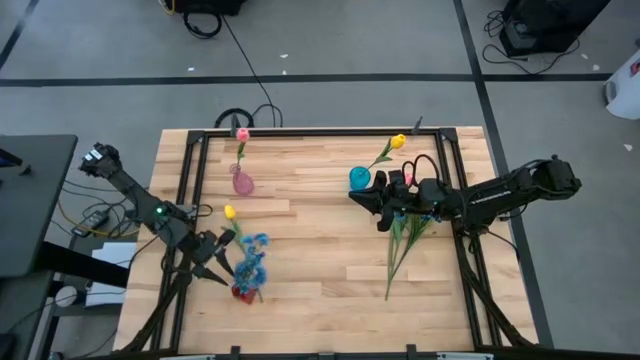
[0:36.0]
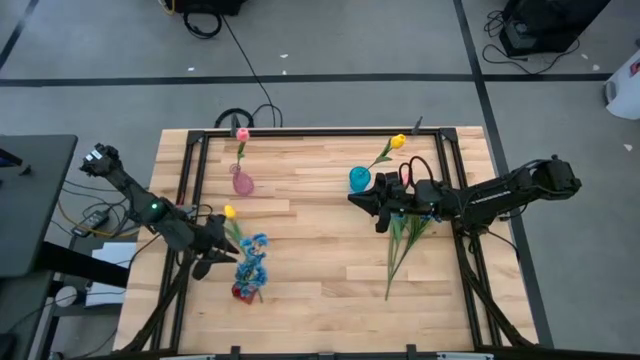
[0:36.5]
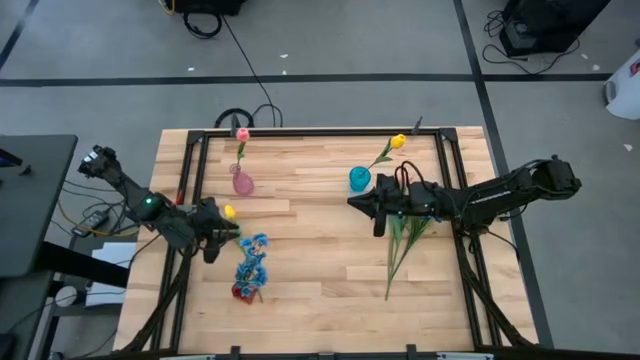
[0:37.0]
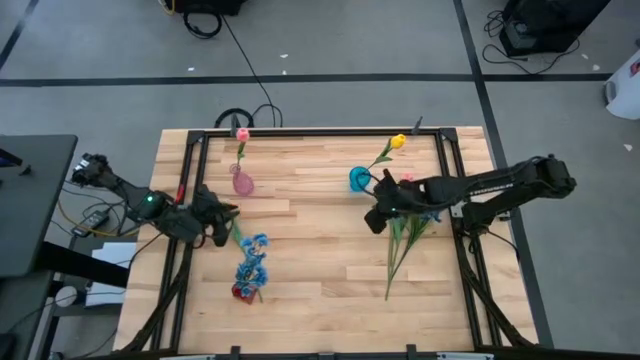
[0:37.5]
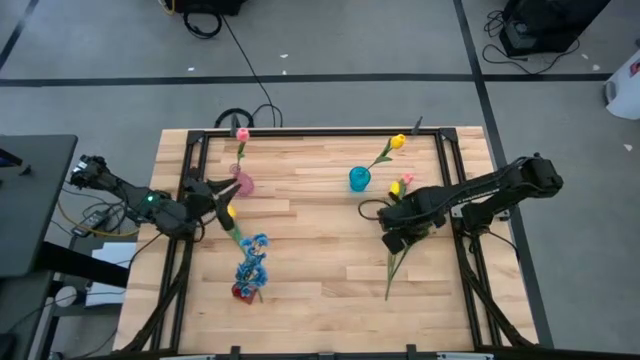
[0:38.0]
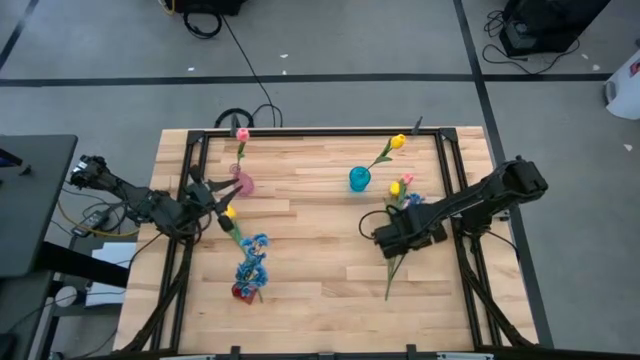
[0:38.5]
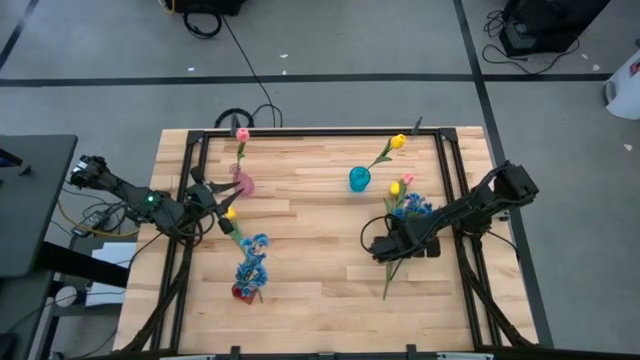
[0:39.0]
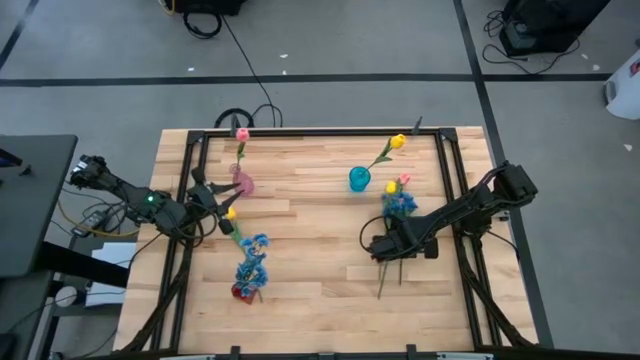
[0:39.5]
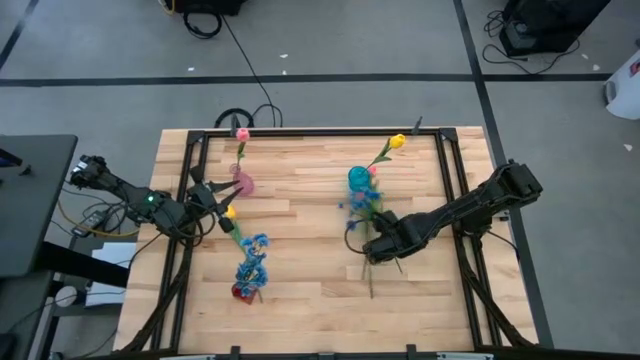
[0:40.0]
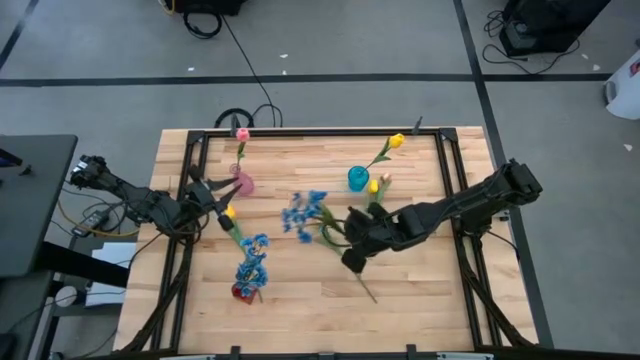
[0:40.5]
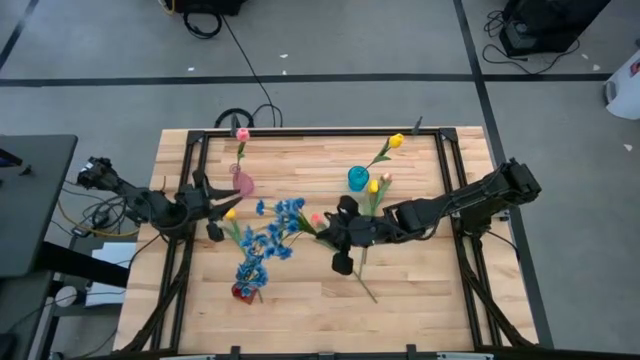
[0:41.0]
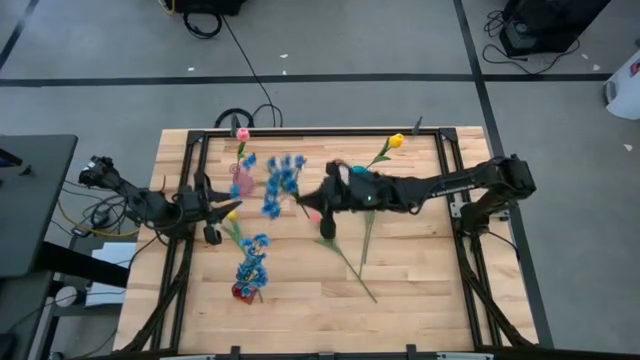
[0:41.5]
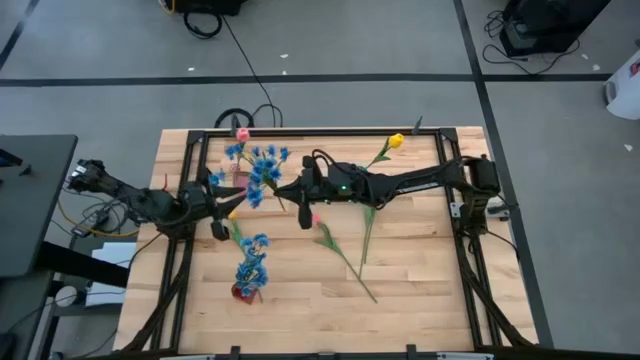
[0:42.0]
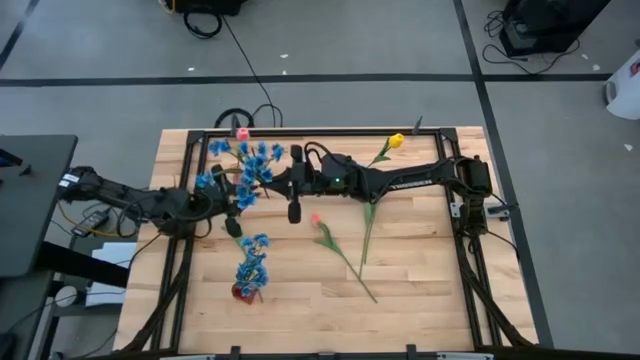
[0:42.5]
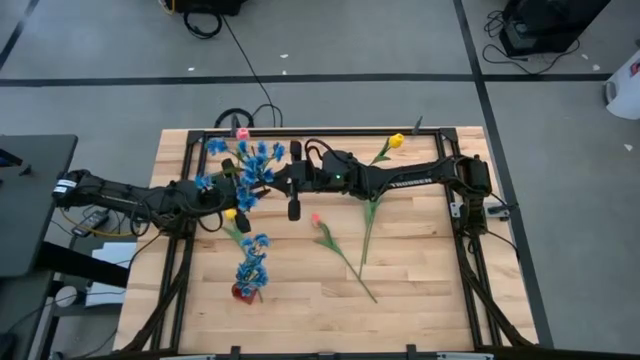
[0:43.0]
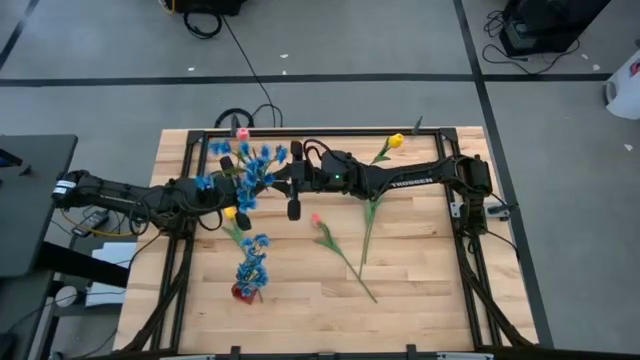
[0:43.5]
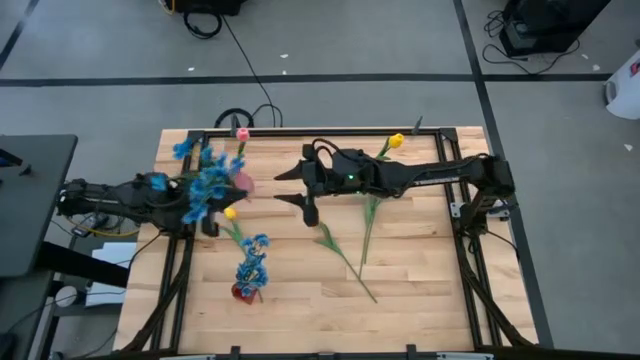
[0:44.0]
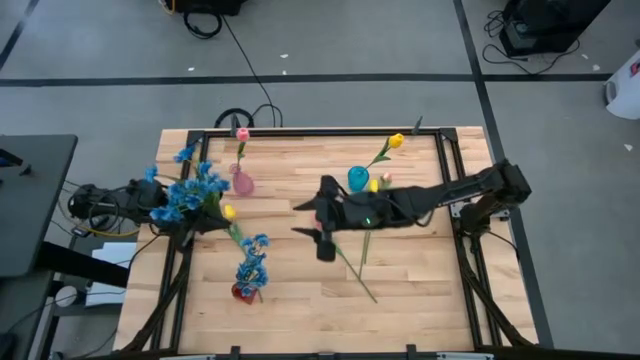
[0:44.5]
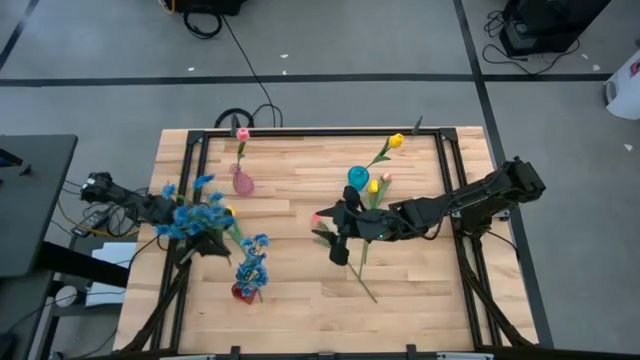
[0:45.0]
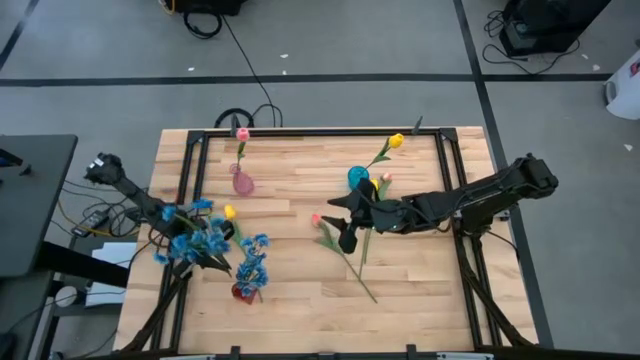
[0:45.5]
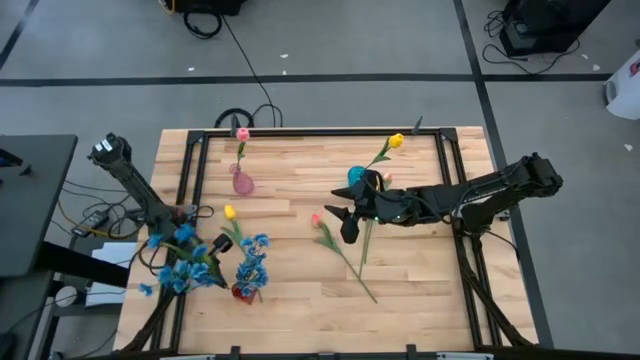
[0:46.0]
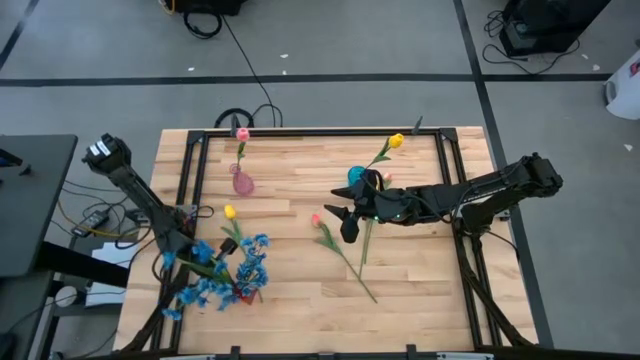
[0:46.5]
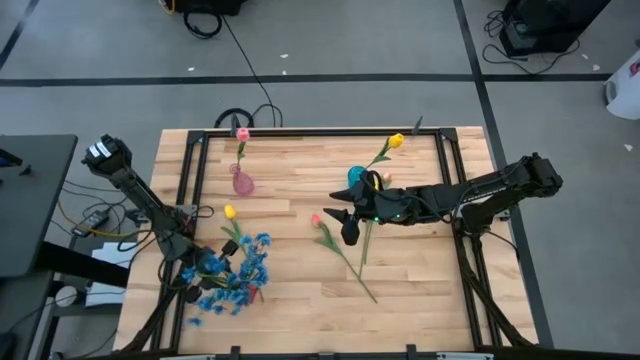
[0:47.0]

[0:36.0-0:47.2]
Task: Sort flowers into vase by color
Put the blue flowers into the red vase

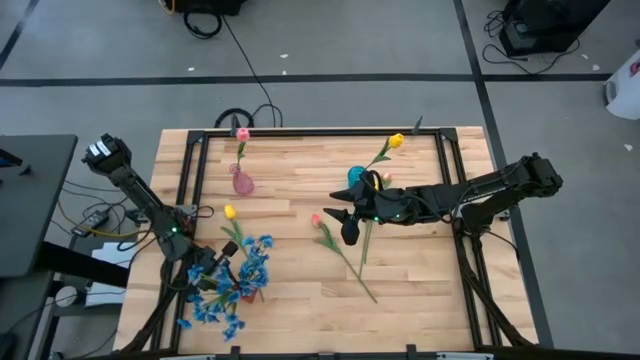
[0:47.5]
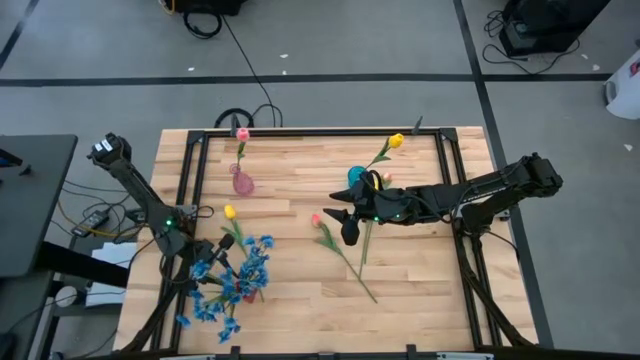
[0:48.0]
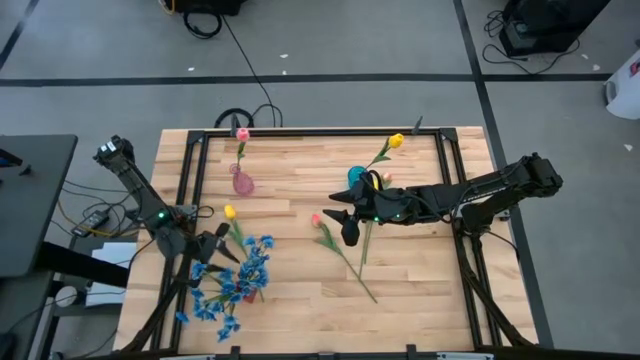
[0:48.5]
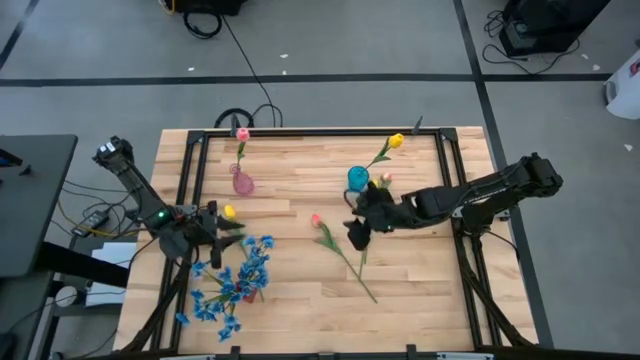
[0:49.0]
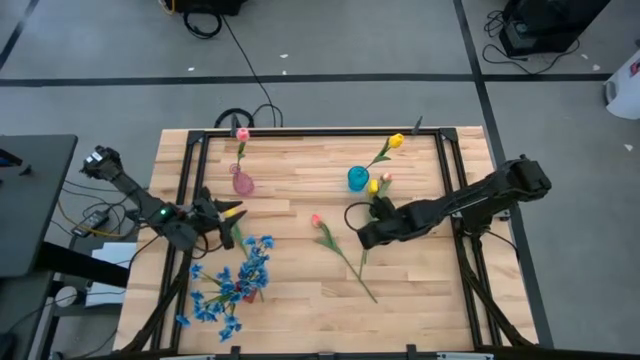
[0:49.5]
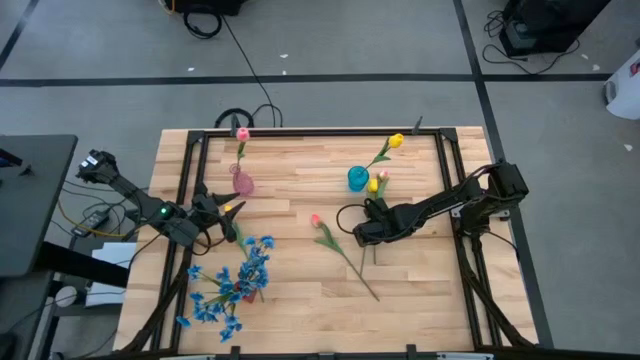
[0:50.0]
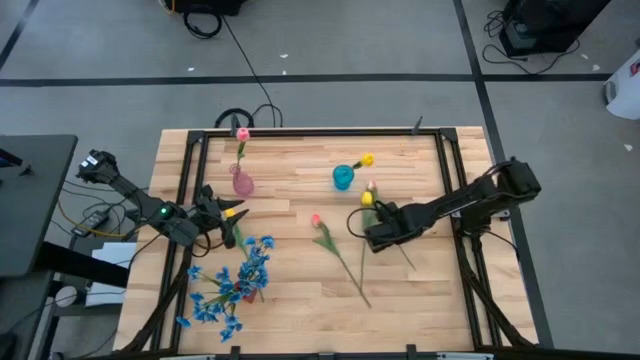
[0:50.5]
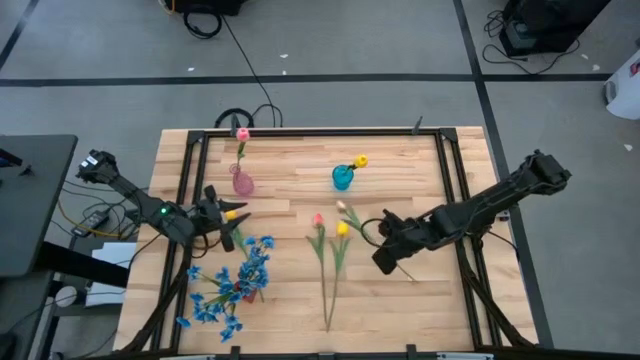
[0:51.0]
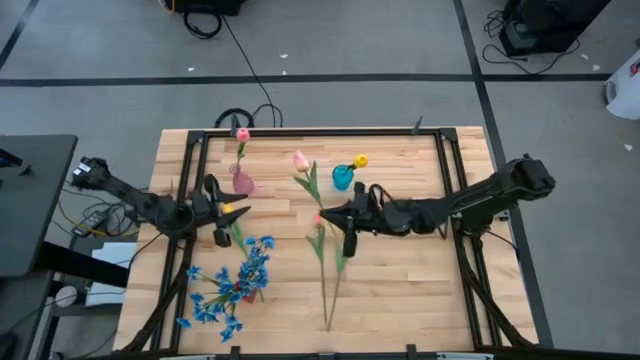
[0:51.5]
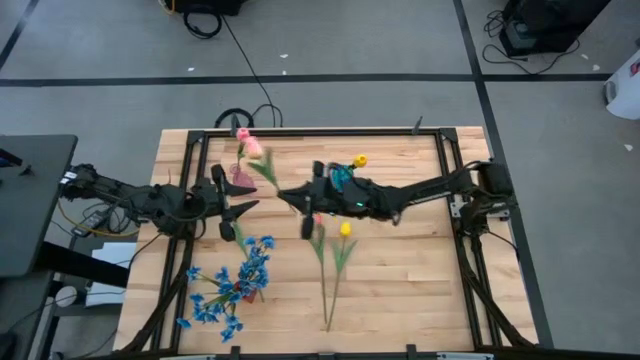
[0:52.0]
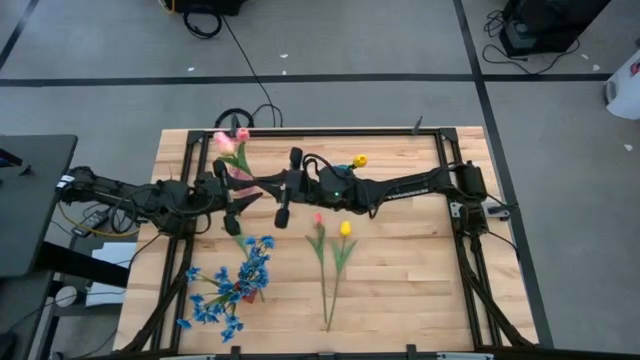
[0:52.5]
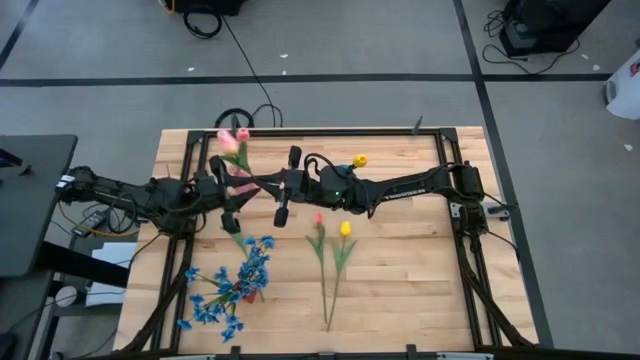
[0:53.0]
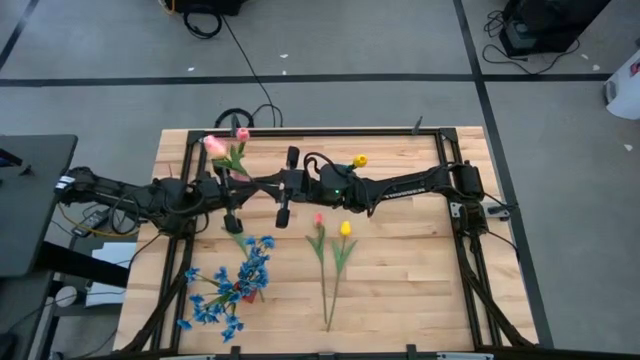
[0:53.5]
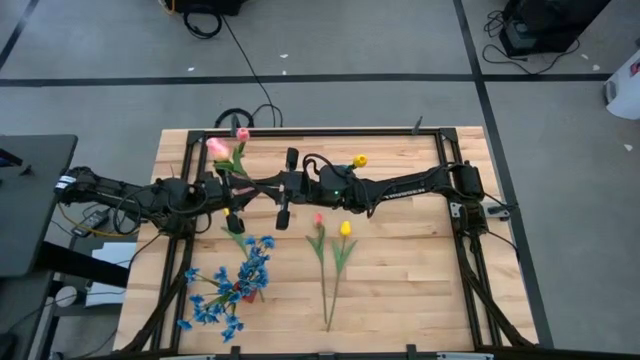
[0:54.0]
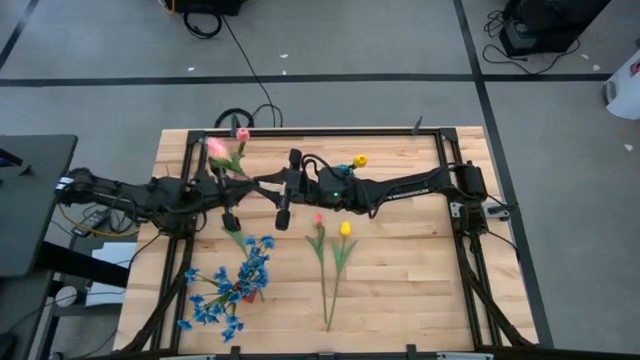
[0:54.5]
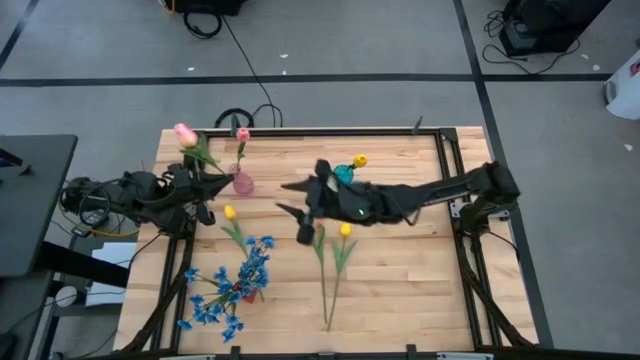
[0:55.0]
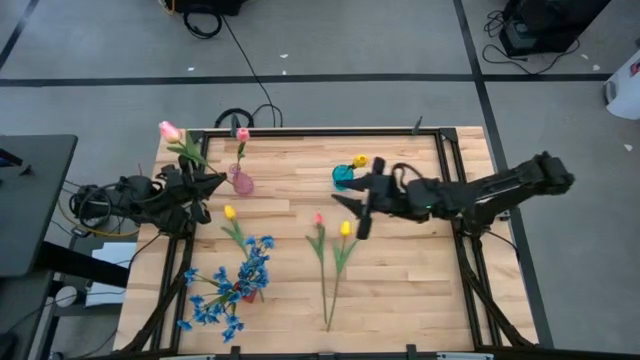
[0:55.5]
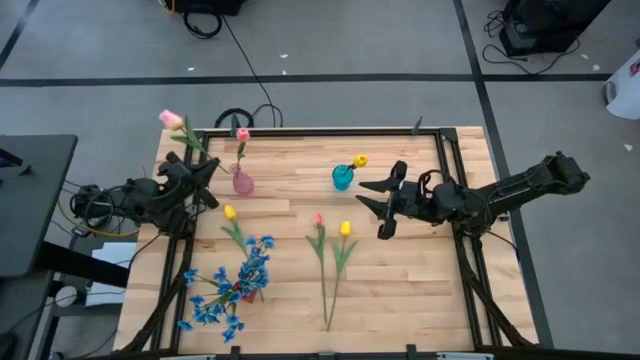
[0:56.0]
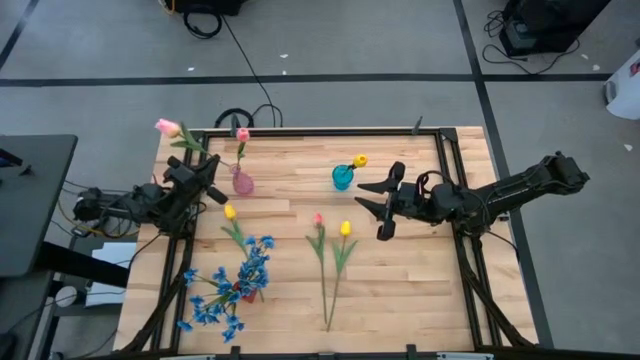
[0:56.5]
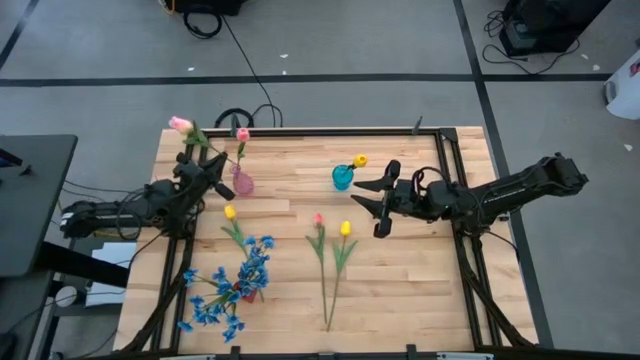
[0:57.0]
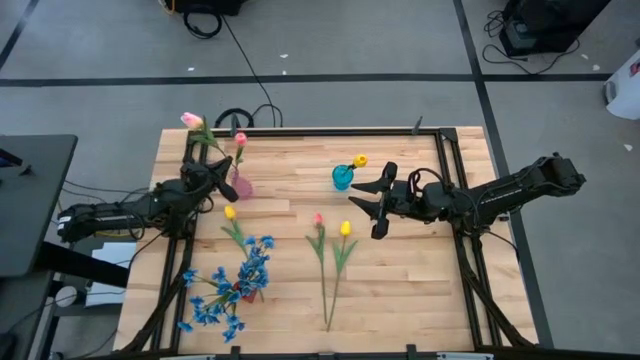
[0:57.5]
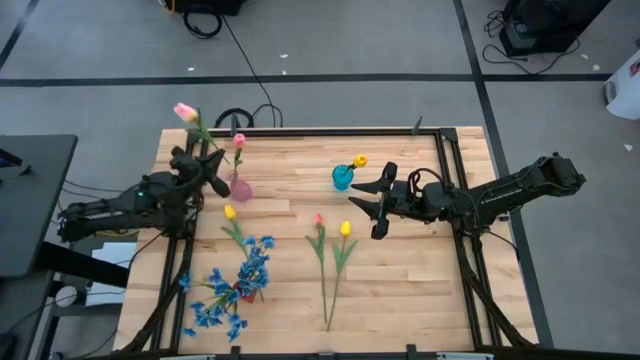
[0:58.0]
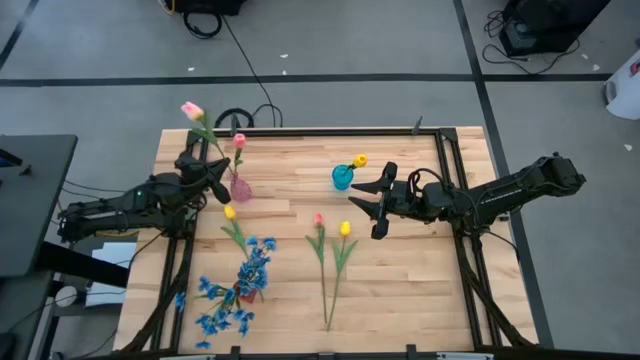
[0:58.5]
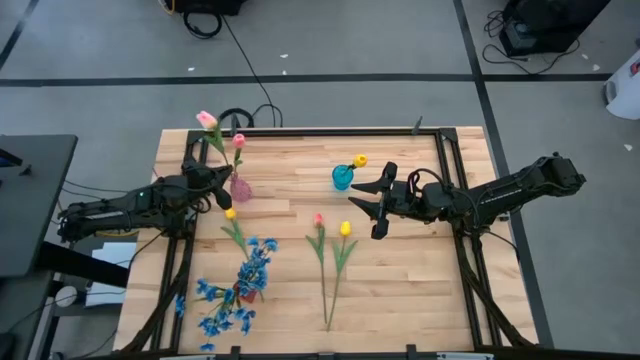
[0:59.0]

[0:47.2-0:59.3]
Put the right pink tulip into the violet vase
